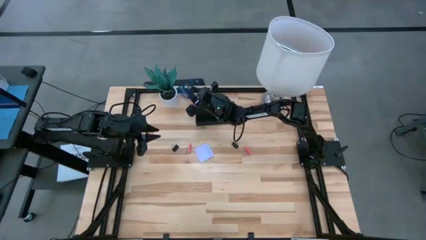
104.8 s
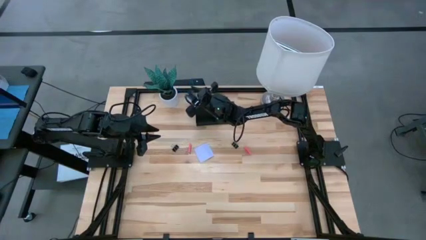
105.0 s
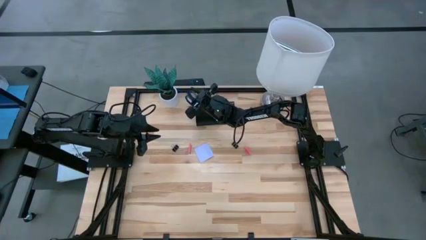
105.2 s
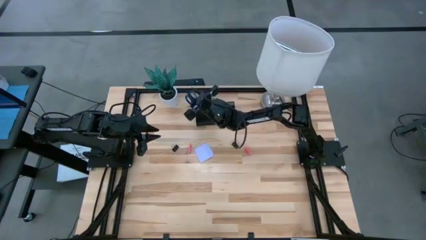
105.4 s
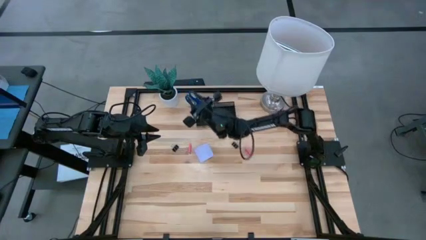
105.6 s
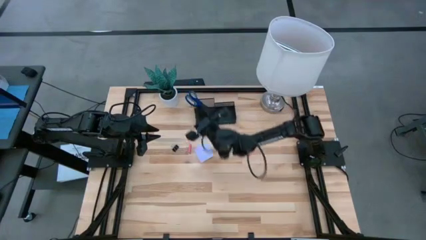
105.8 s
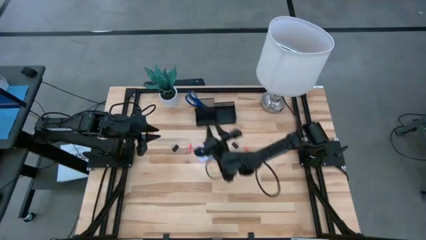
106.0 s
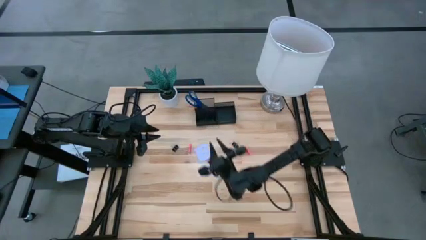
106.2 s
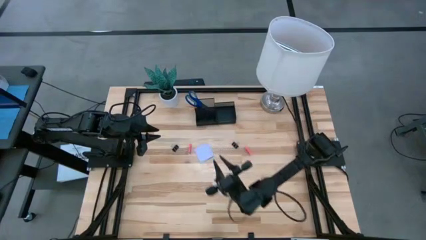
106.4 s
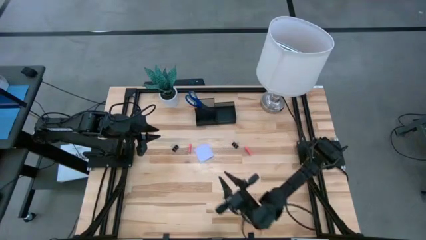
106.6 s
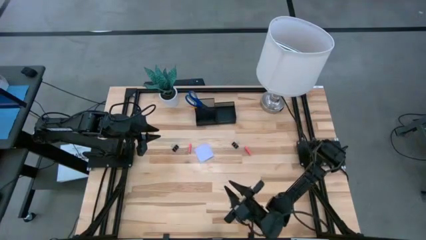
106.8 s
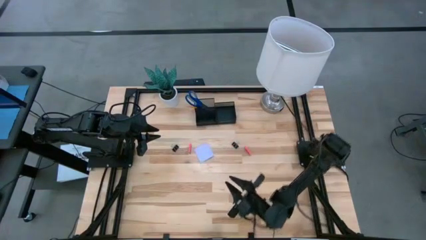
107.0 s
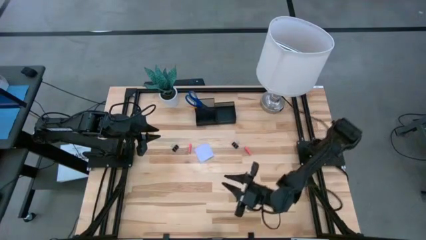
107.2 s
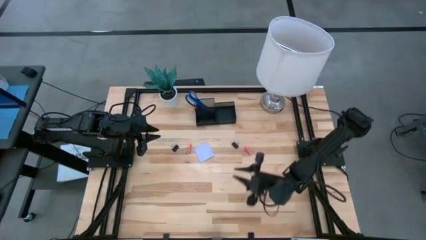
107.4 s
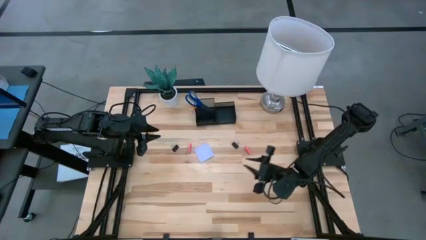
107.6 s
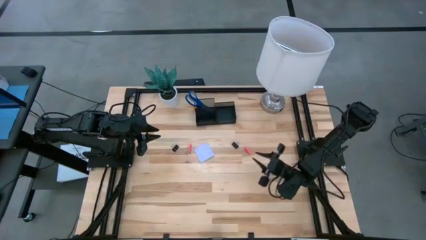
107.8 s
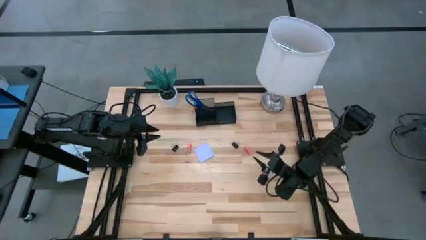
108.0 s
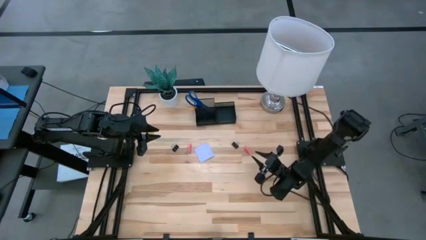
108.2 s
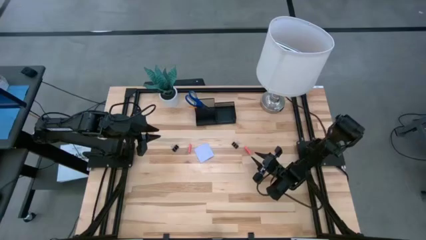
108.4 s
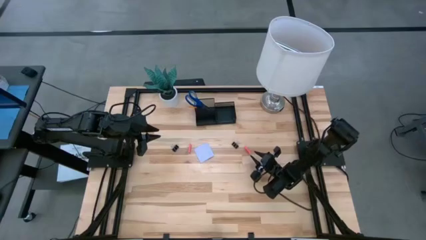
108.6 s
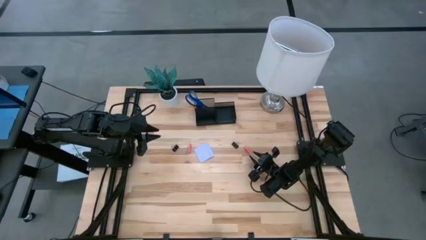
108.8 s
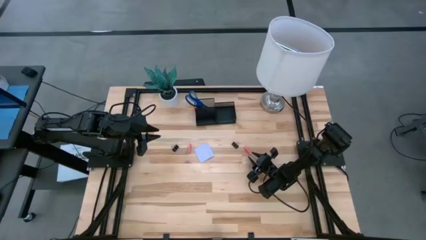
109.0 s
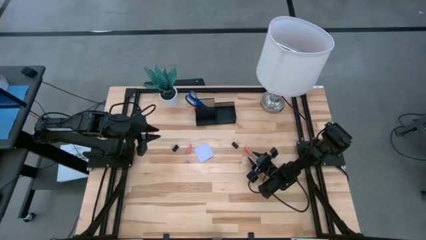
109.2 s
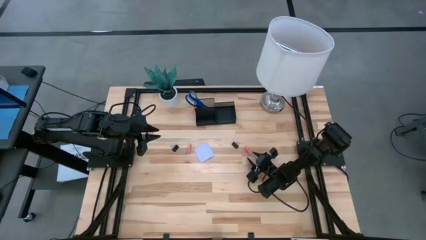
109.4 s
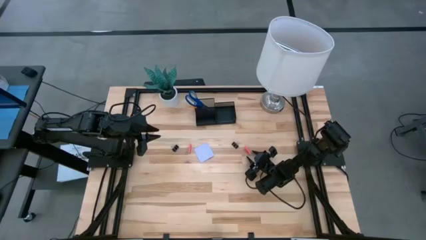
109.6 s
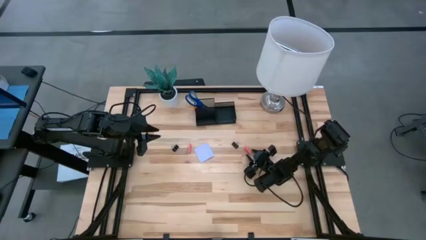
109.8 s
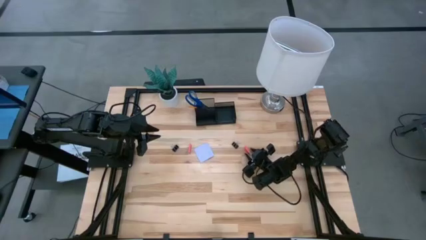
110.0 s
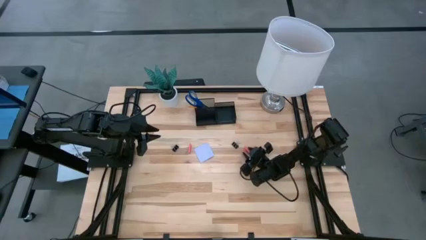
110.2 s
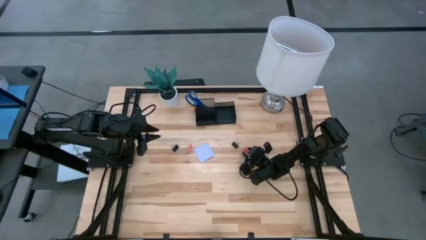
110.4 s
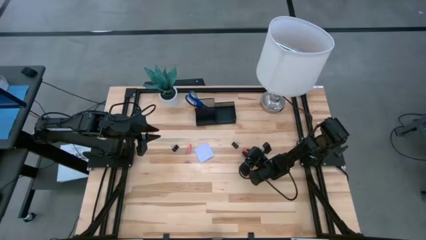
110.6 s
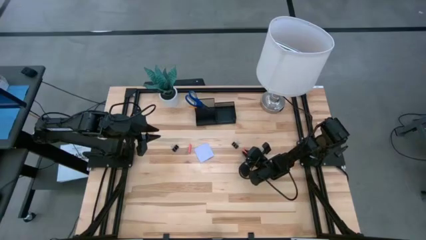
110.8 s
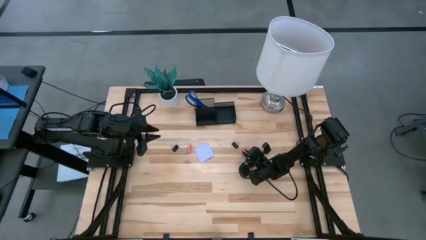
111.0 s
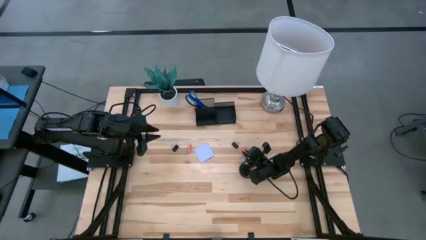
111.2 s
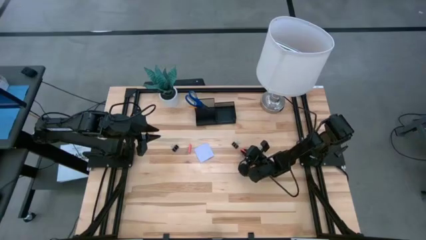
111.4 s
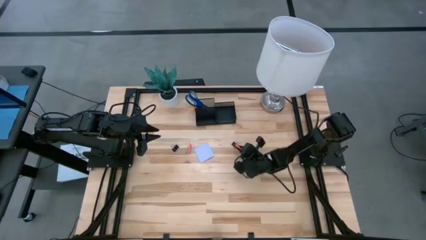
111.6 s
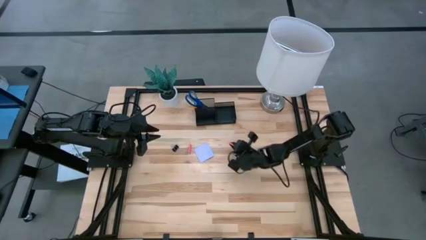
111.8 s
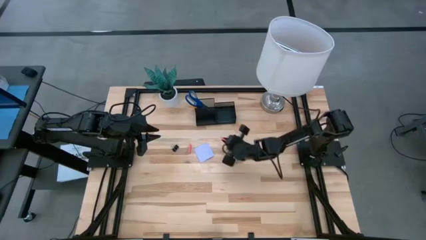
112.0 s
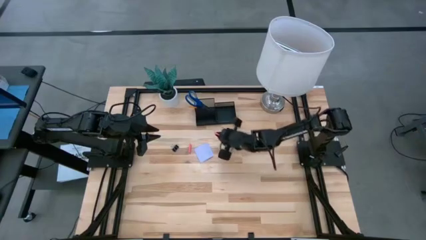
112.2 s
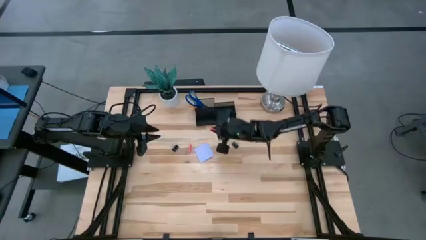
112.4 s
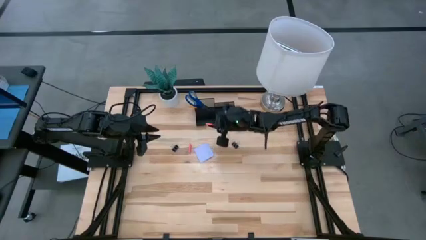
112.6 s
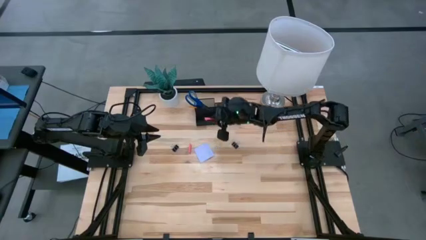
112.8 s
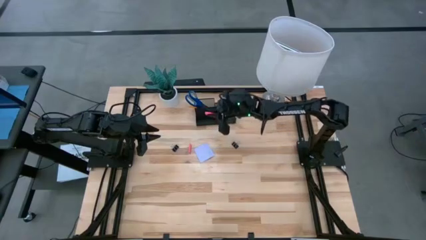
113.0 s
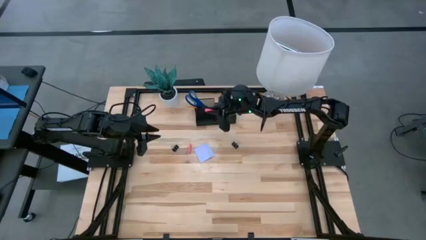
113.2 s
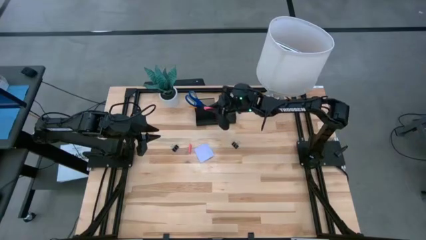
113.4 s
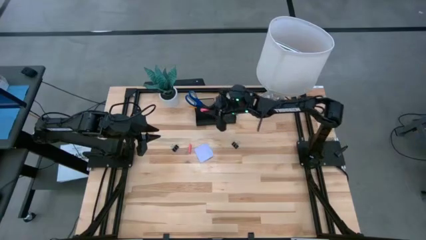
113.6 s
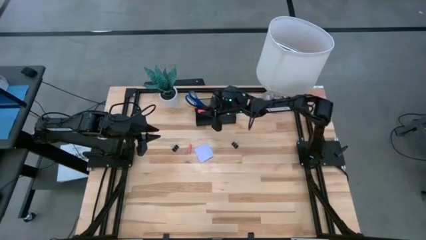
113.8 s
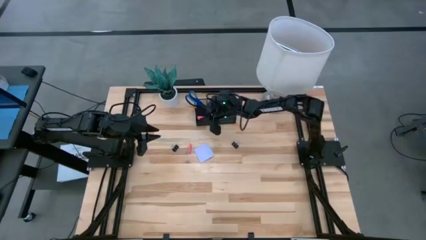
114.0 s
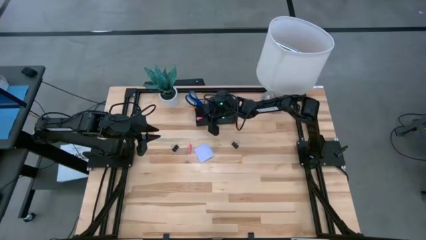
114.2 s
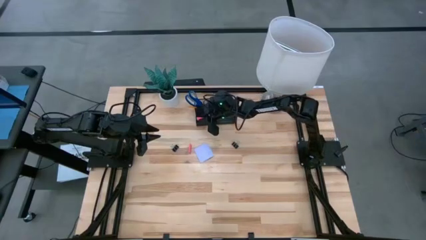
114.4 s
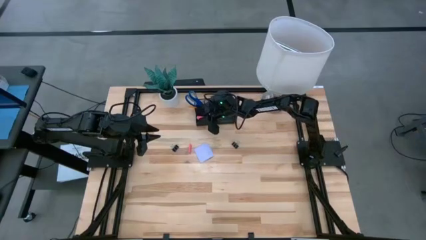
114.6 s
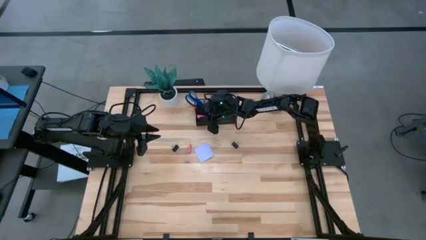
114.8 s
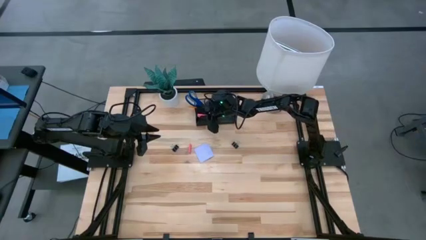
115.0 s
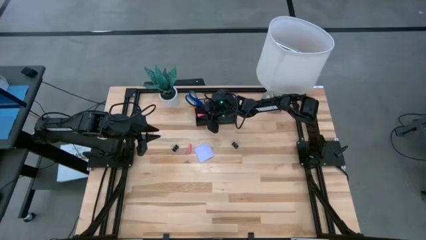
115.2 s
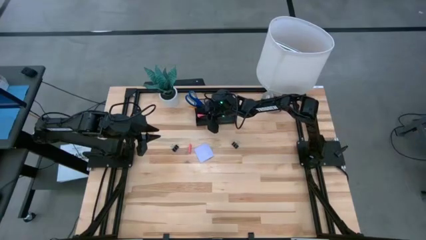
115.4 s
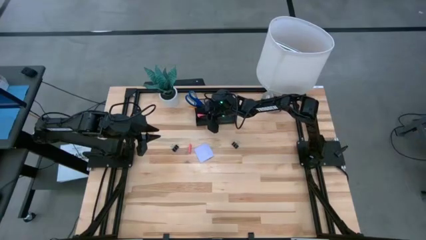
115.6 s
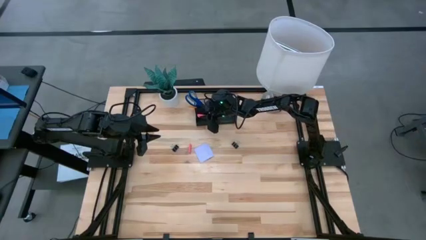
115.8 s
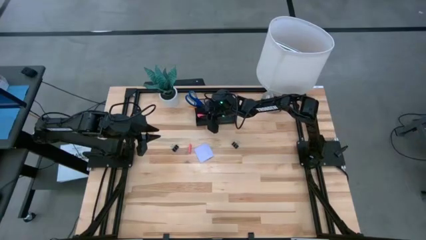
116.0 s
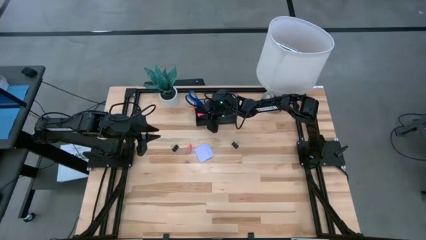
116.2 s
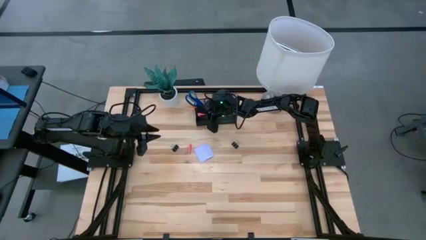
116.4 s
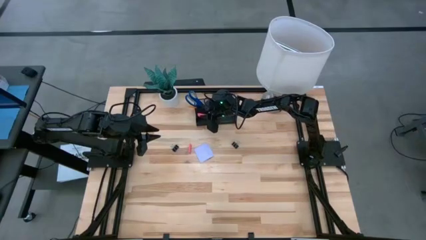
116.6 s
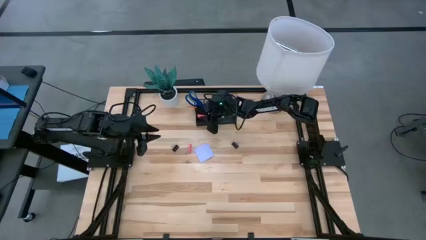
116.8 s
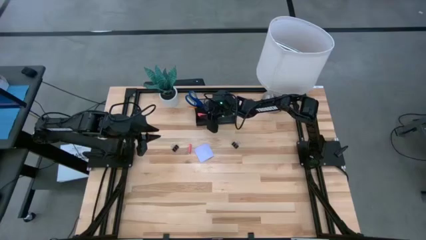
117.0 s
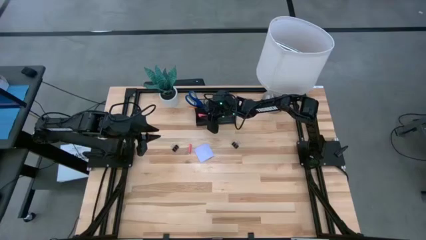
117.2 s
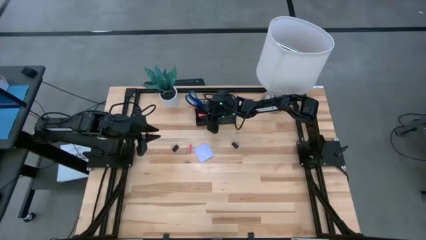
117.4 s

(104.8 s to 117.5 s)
Task: Pick and place office supplies into organizer
Put the right eraser into the desk organizer
